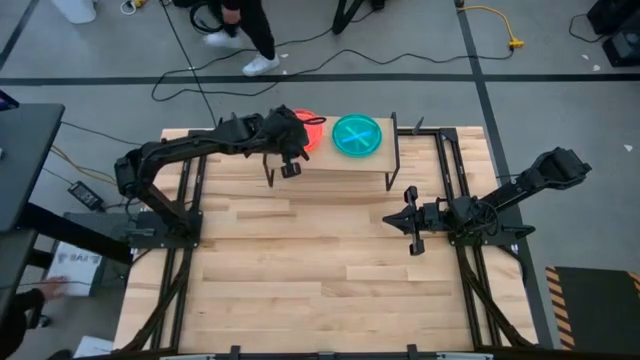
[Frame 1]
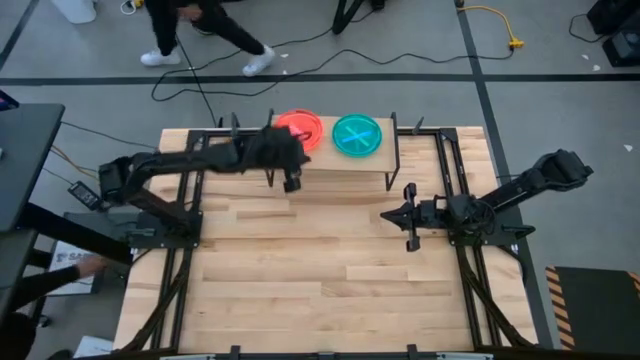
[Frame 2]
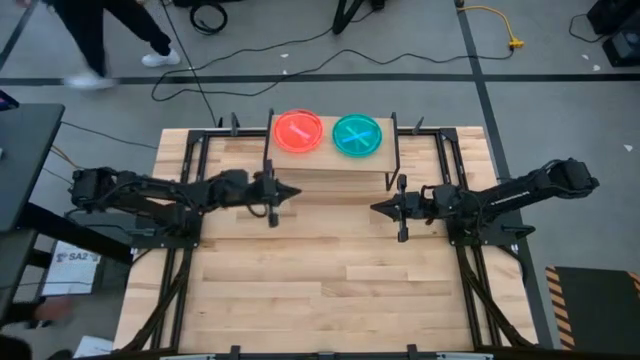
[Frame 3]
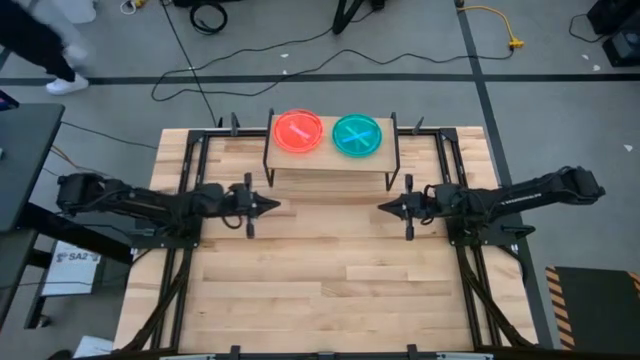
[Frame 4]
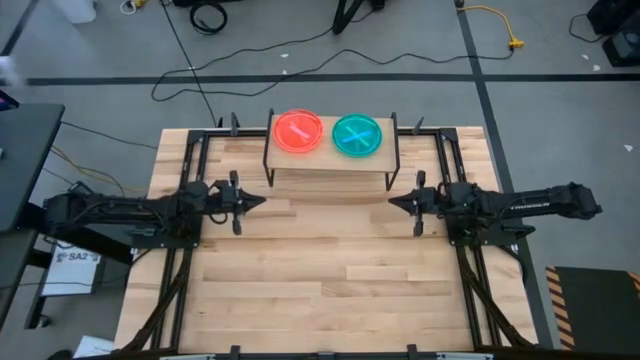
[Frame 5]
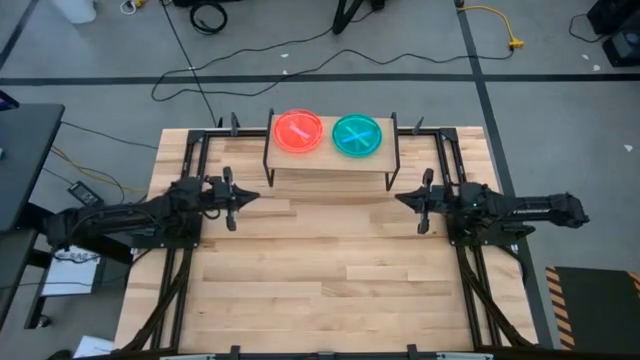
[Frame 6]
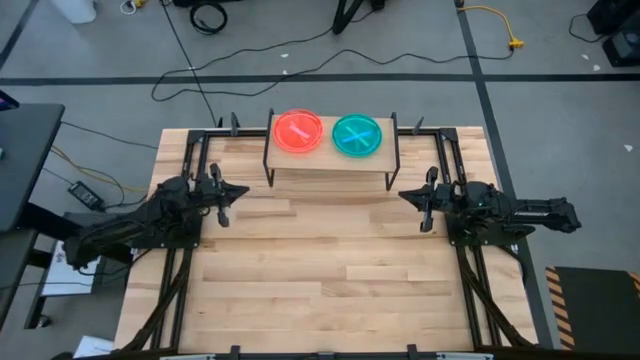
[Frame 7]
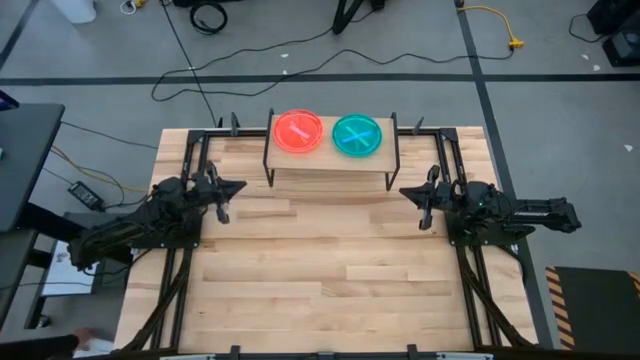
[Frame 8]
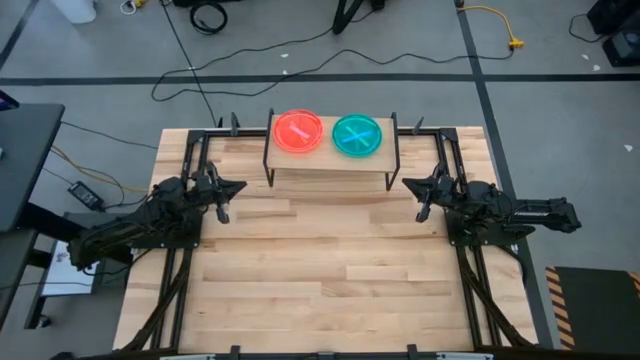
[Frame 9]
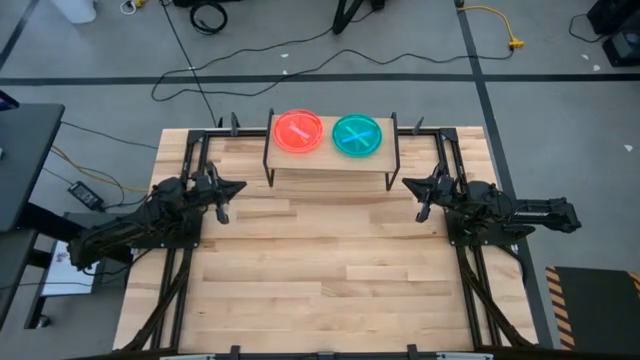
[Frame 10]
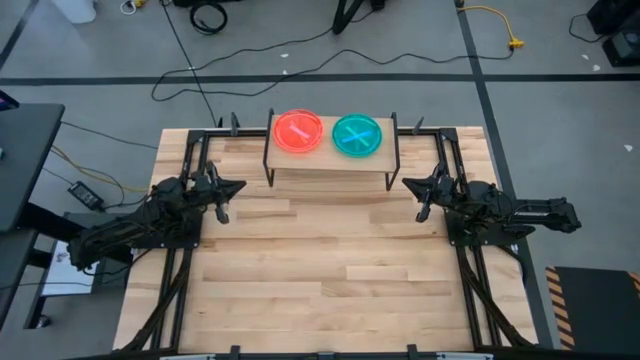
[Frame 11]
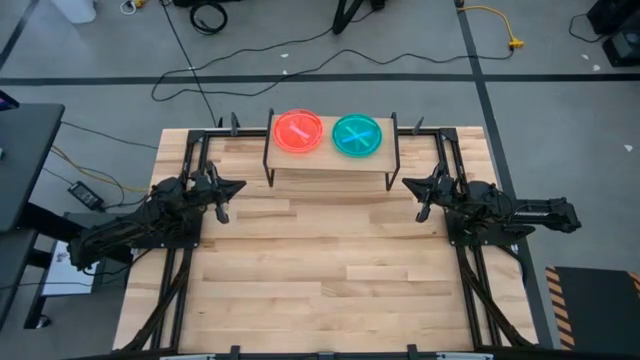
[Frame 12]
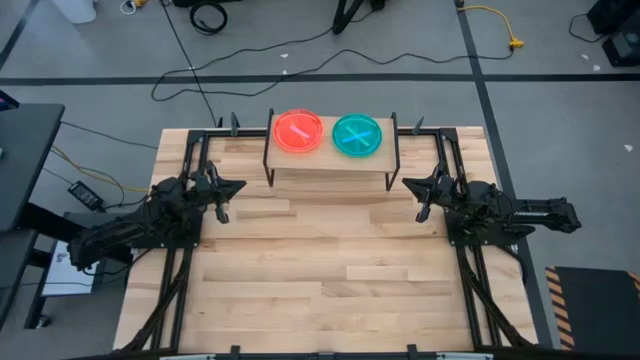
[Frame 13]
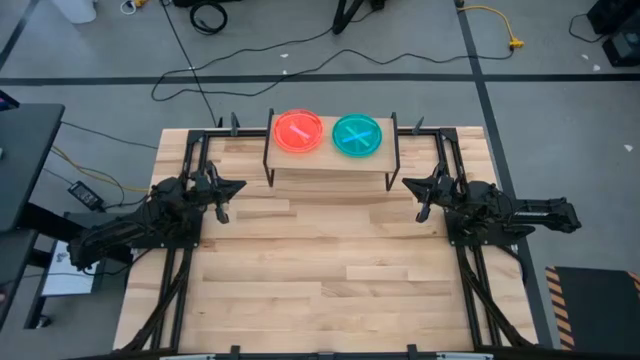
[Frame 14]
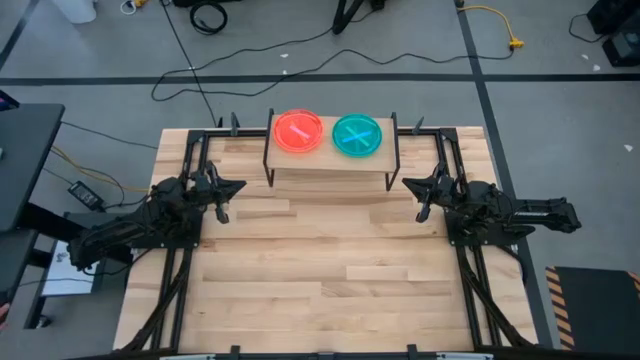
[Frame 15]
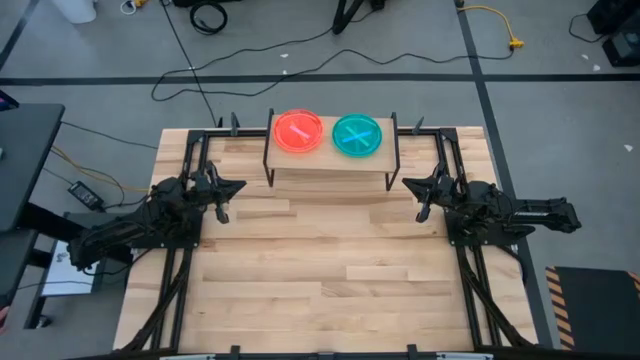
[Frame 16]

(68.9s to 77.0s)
Task: Place and stack plates onto a shelf
Return to Home Position

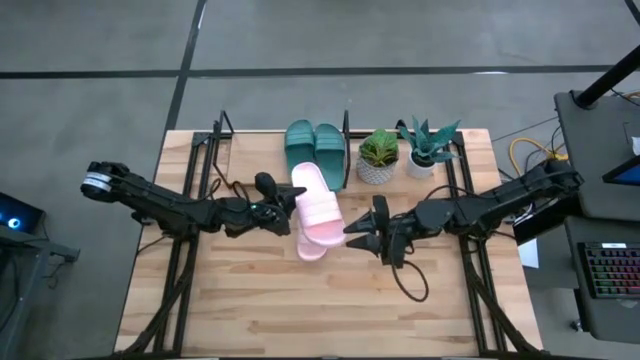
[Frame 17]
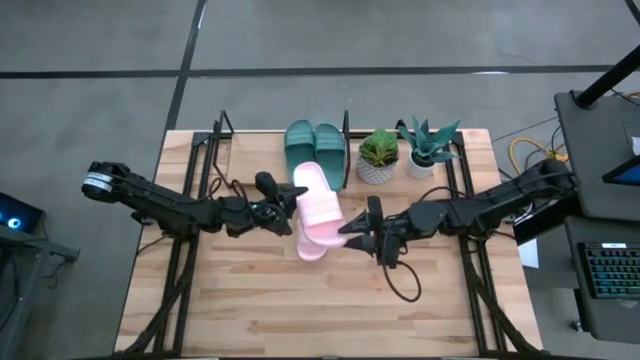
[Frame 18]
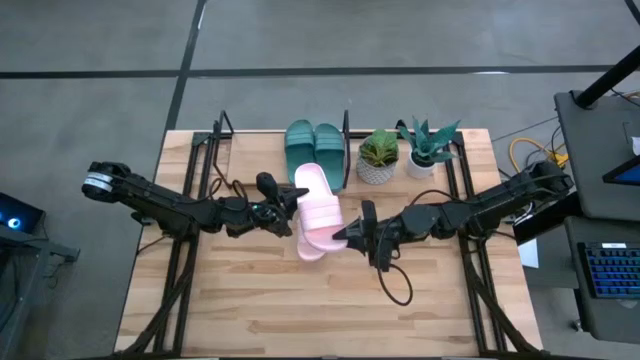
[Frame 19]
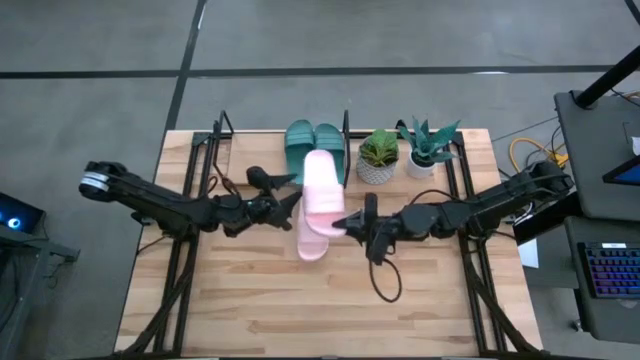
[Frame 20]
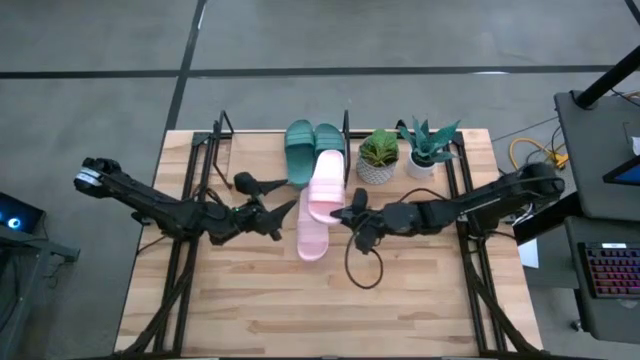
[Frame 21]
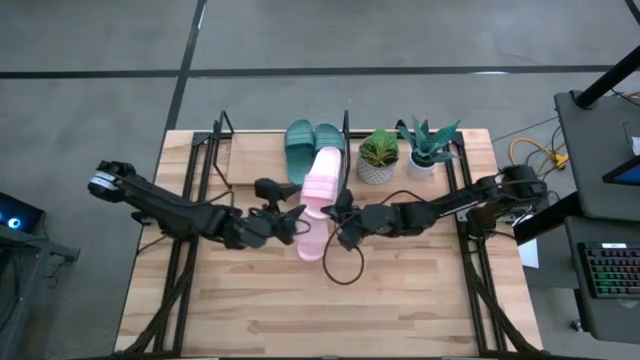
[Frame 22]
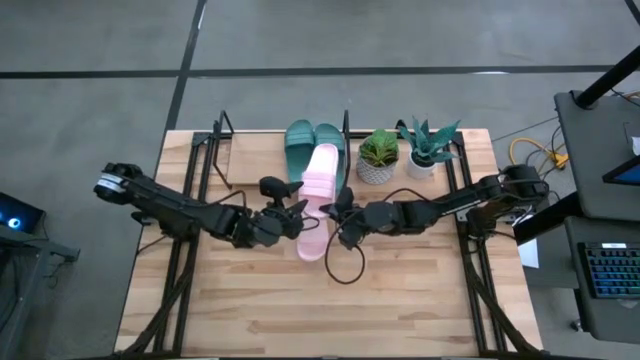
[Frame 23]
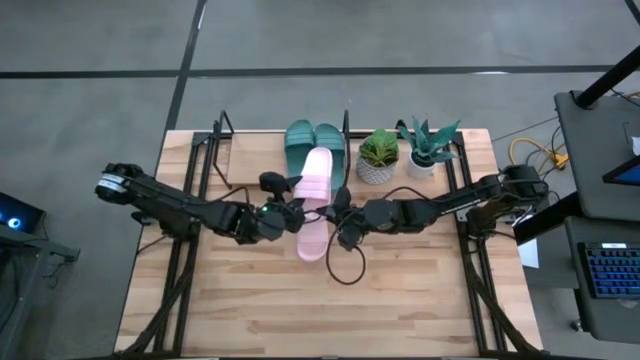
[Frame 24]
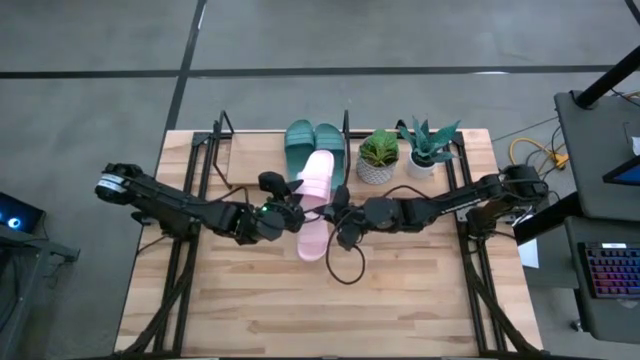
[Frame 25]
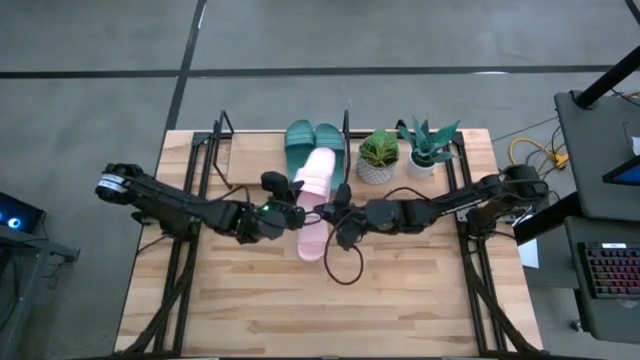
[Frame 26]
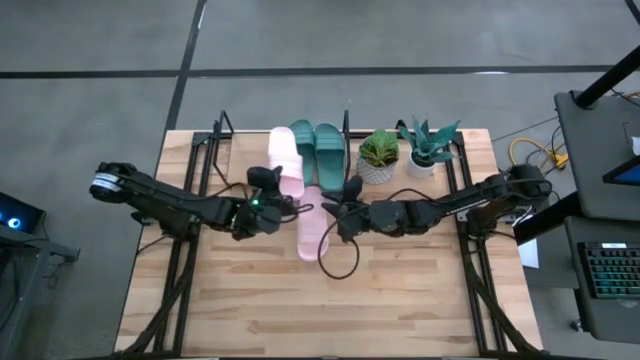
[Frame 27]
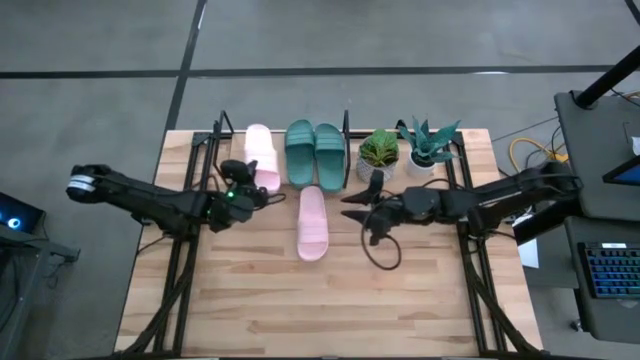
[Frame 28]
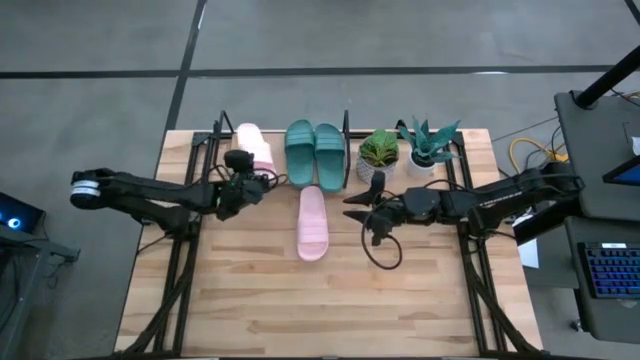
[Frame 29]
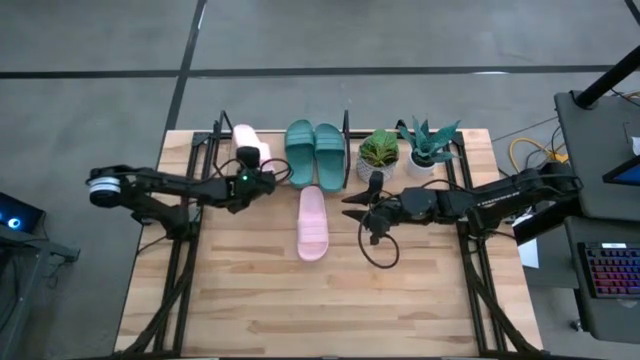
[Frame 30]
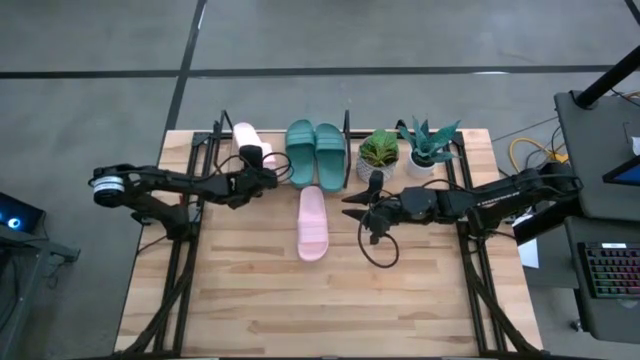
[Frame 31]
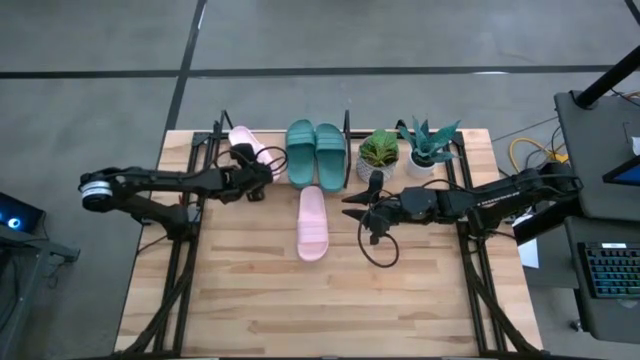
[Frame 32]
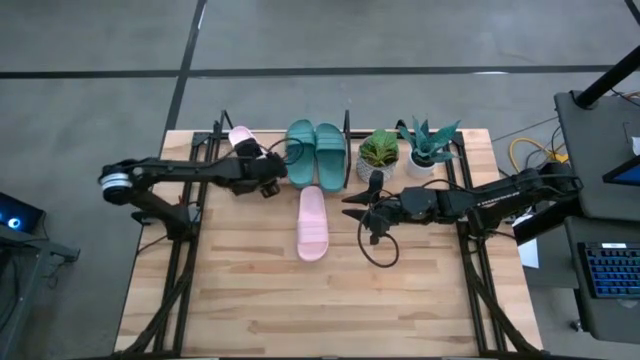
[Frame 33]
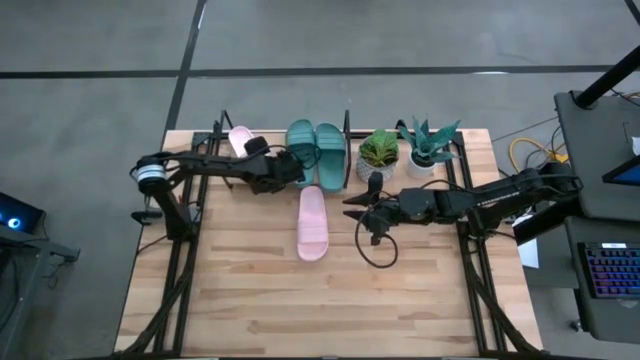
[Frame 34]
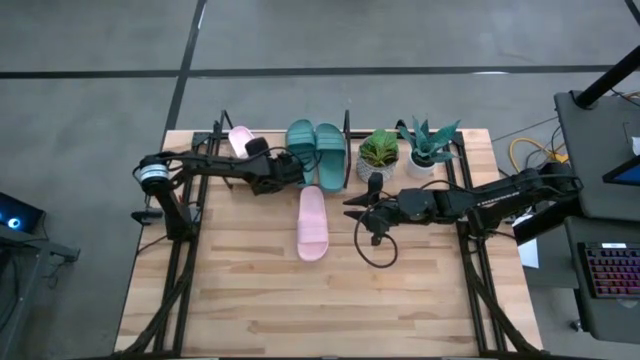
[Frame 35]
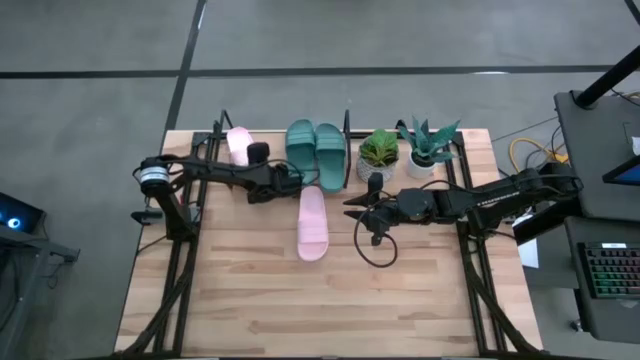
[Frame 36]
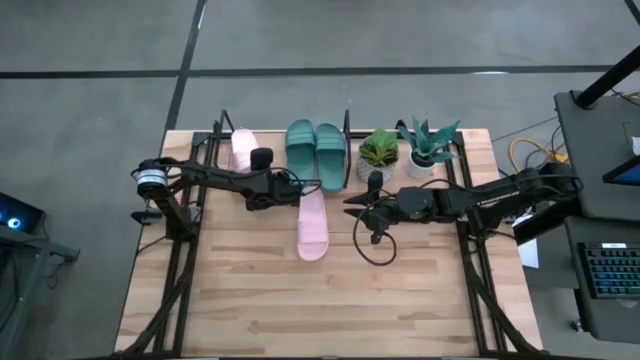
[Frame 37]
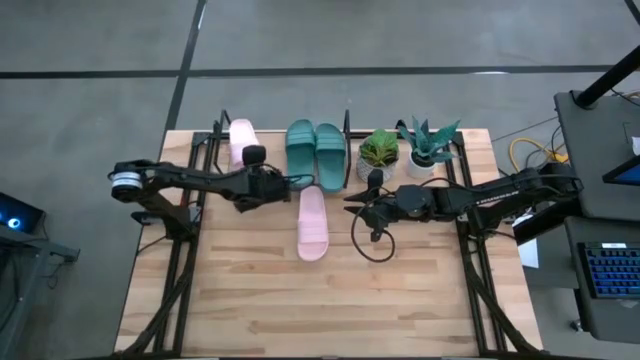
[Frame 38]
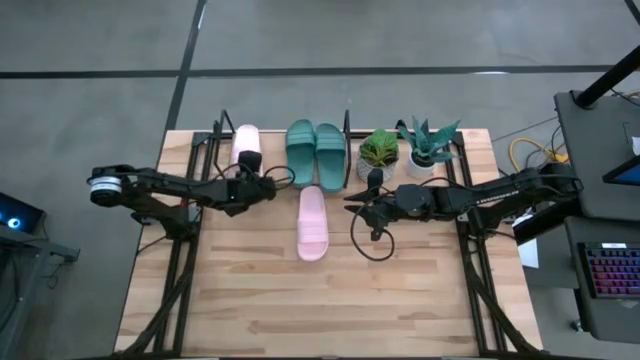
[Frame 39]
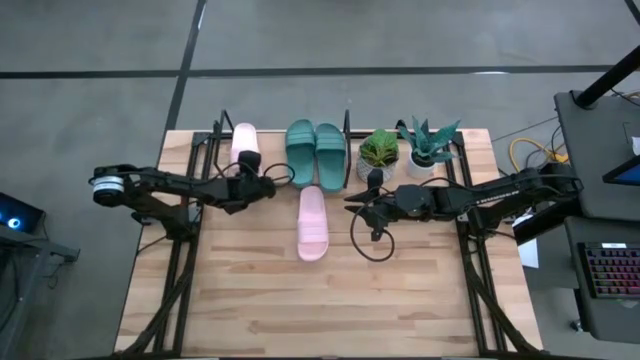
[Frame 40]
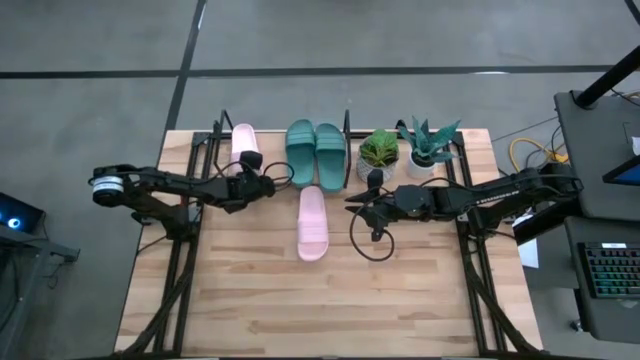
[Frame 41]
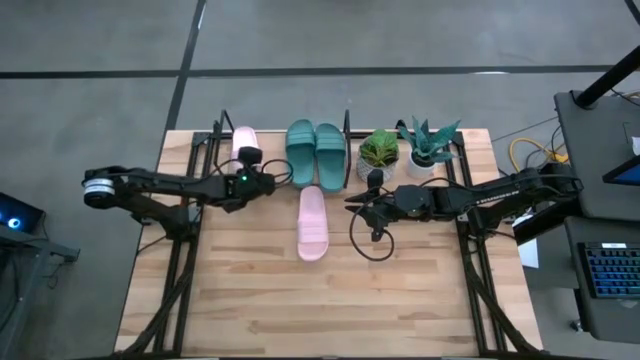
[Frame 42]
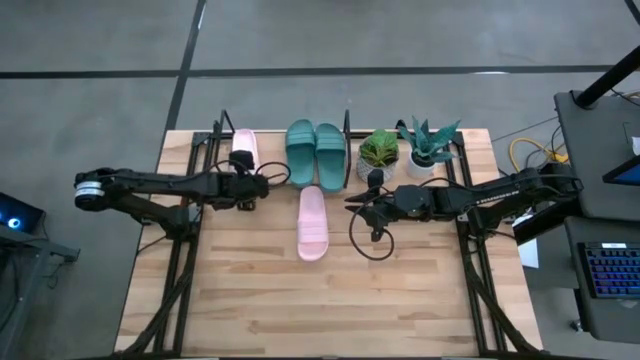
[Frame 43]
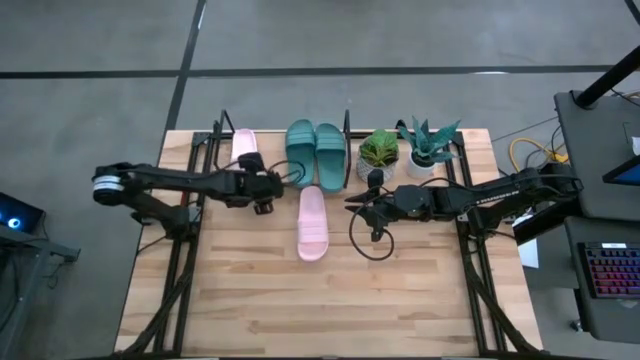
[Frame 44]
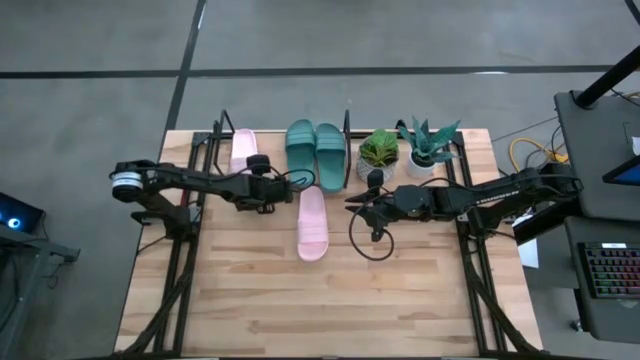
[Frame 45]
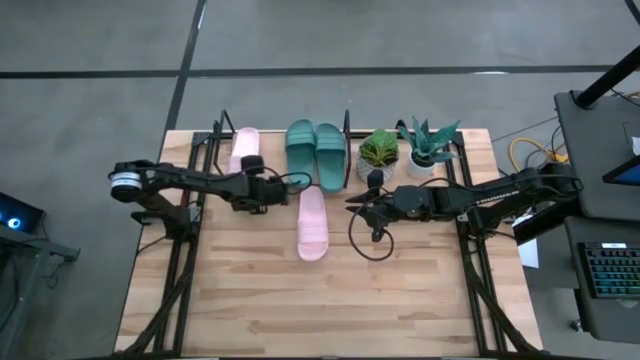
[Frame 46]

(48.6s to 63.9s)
Task: Pick and place slides into the shelf
Put the left pink slide into the shelf

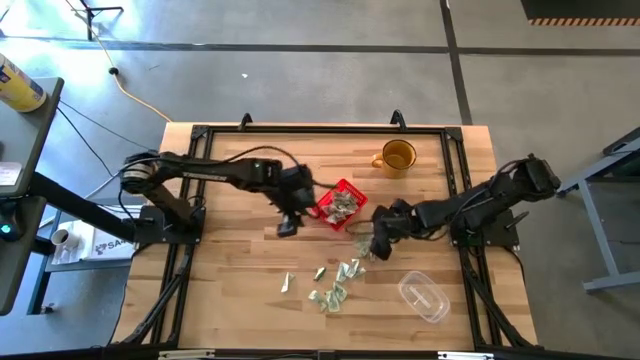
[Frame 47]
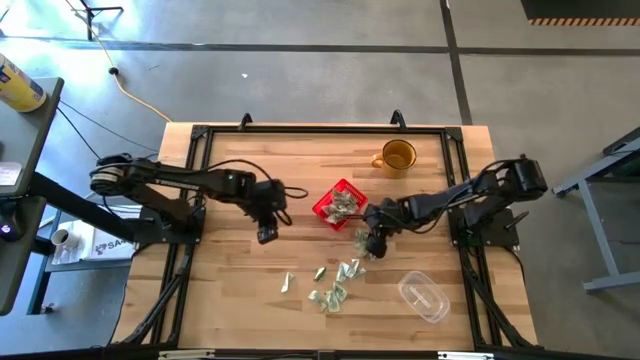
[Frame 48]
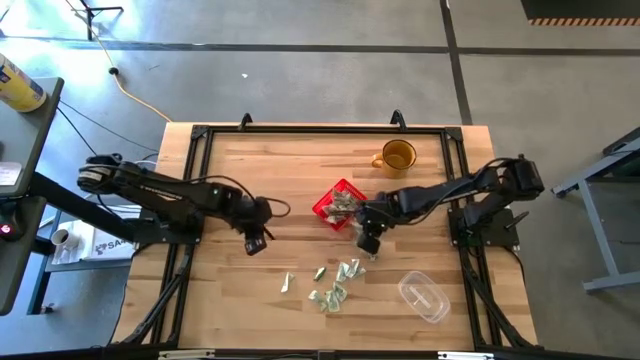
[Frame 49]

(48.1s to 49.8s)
Task: Pick and place items into bin
Put the white stevia packet into the red bin
